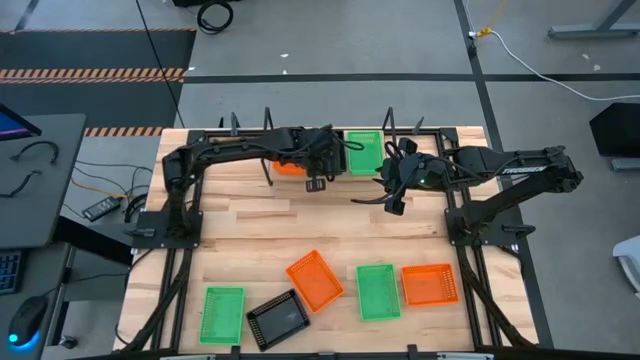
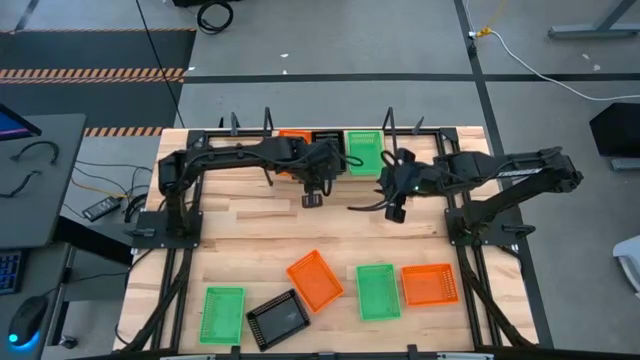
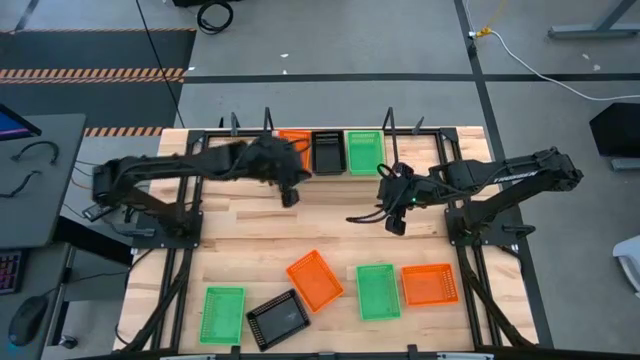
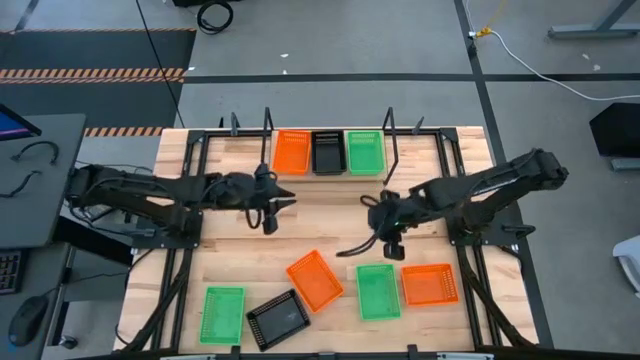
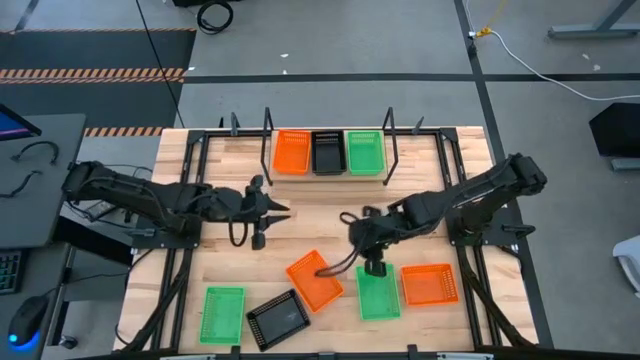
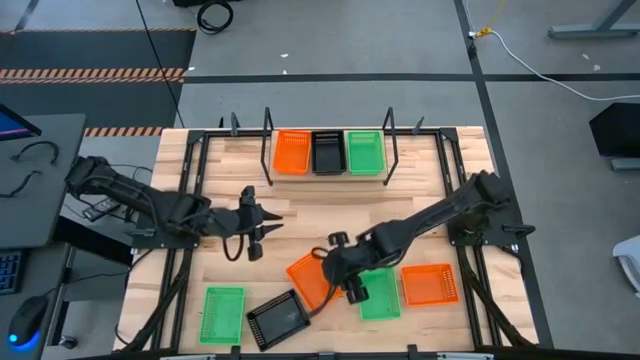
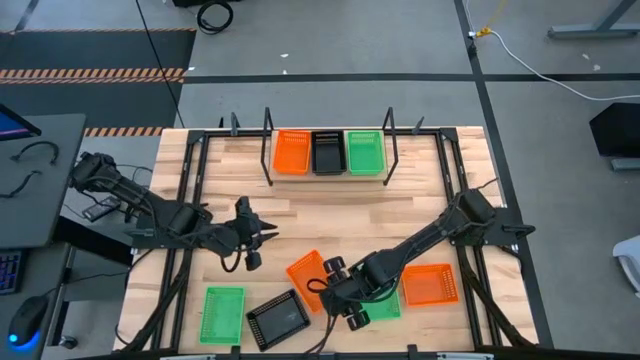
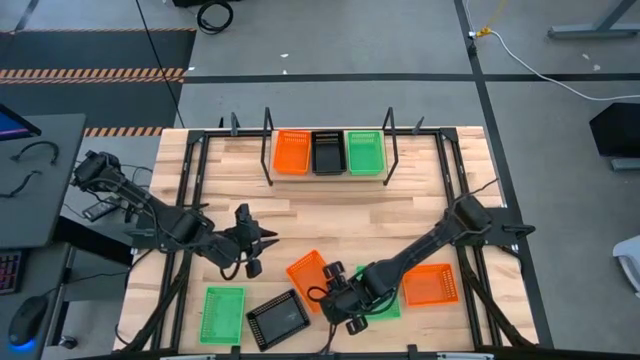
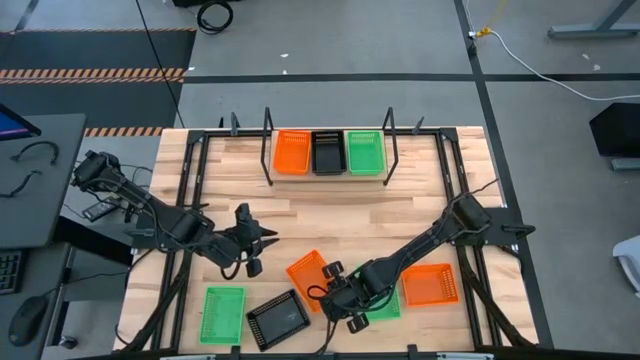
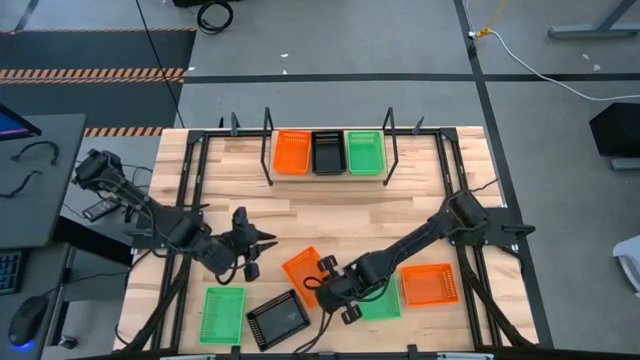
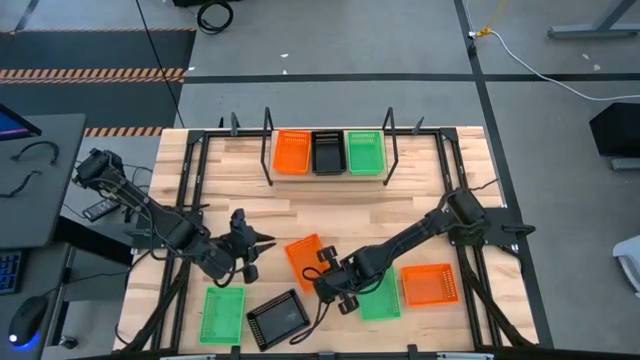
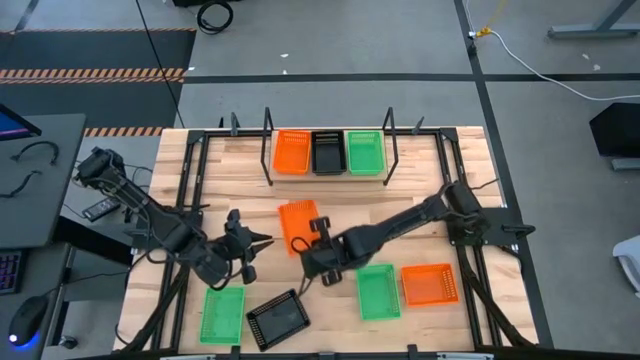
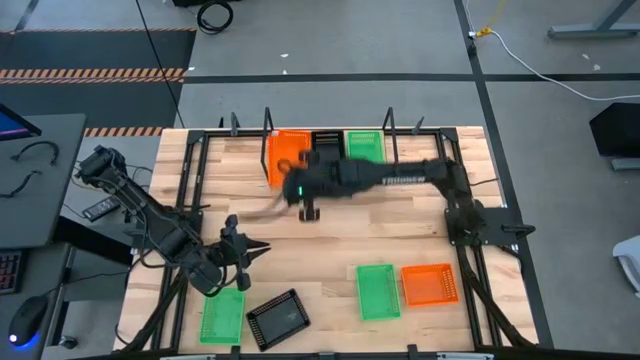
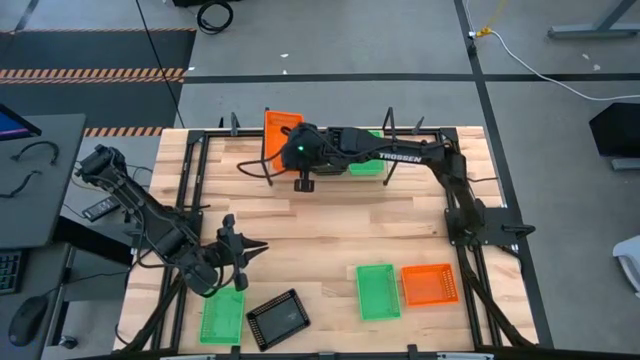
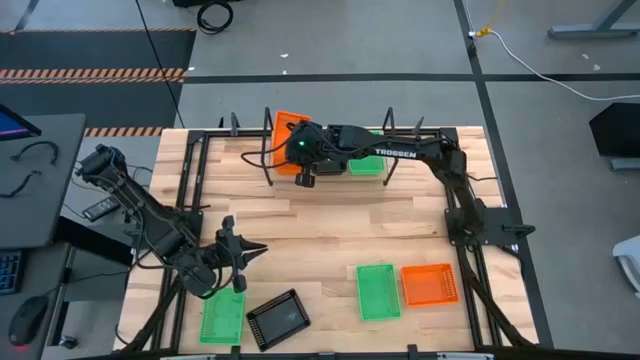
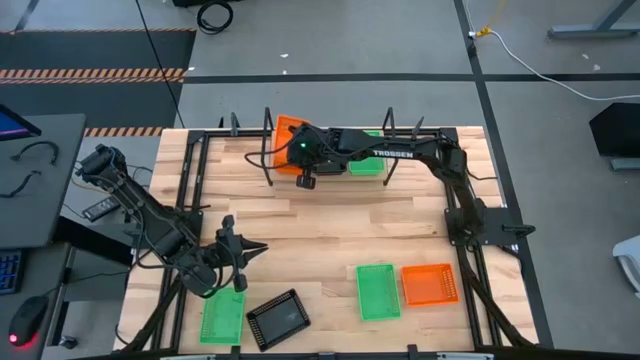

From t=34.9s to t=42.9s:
Task: Stack baskets on shelf by color
Stack the left orange bin on top of the other orange bin on the shelf

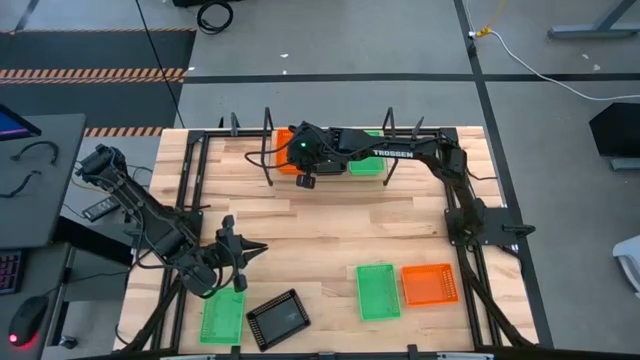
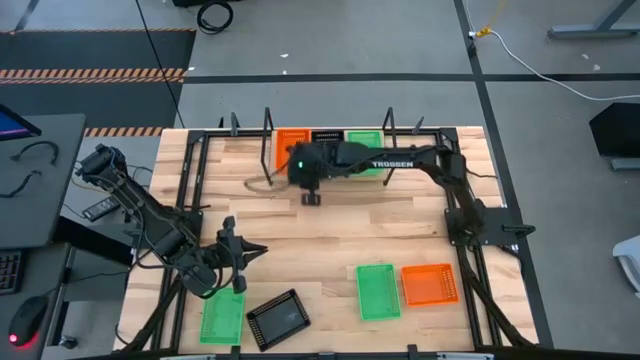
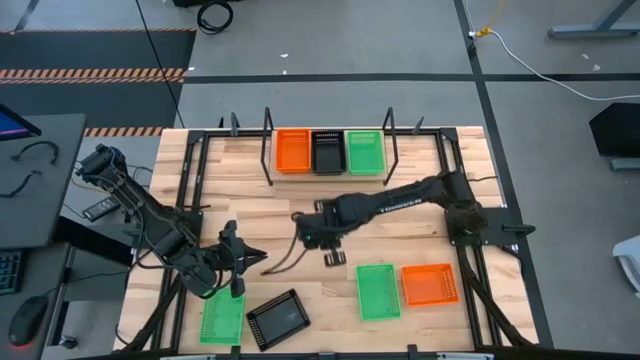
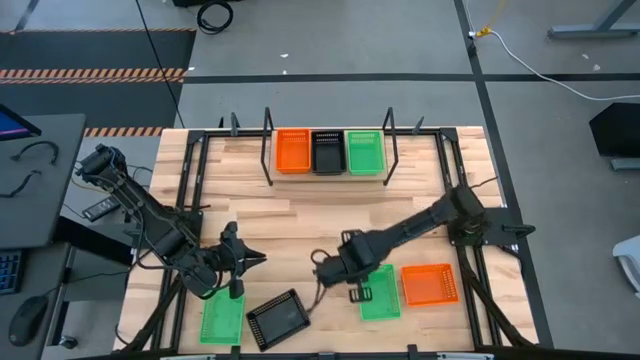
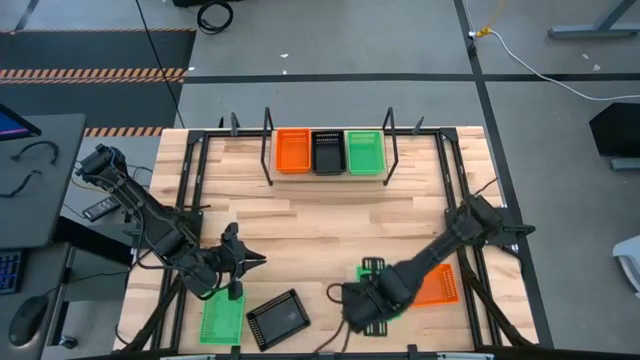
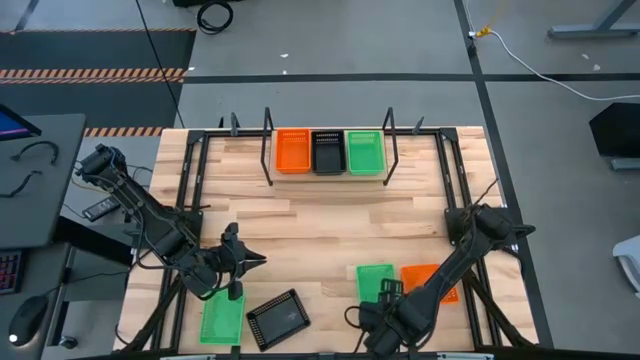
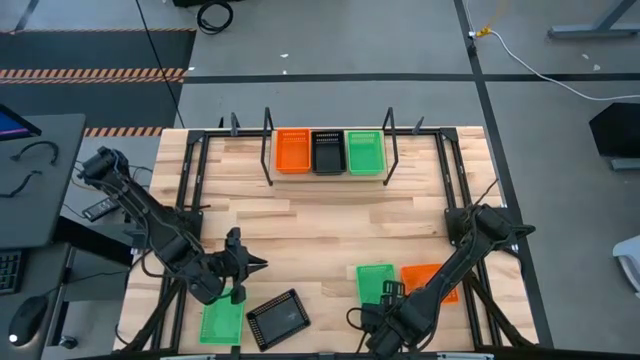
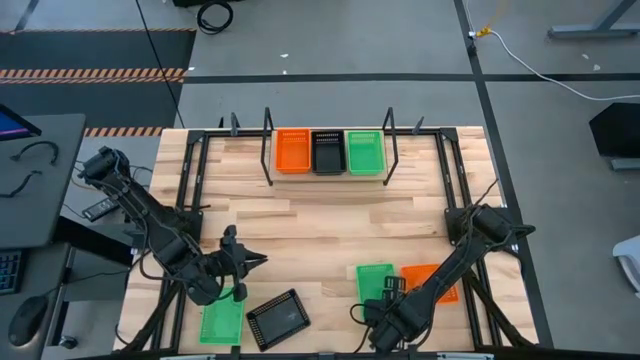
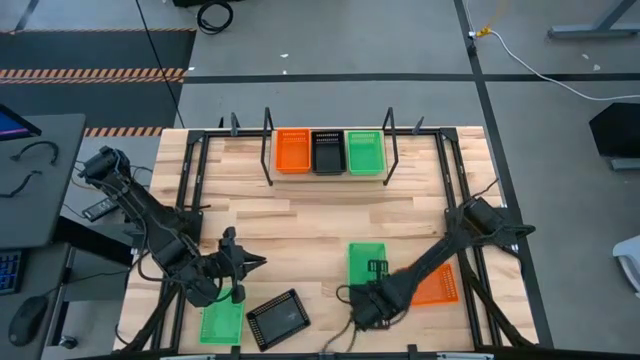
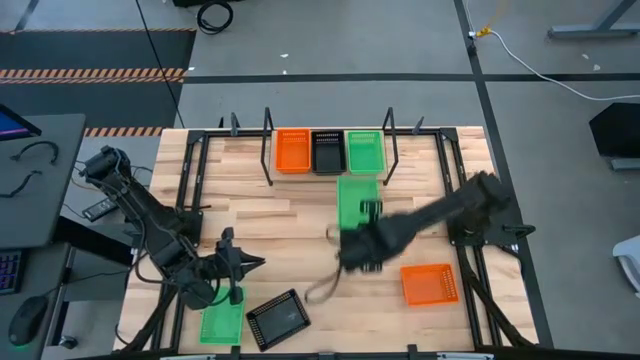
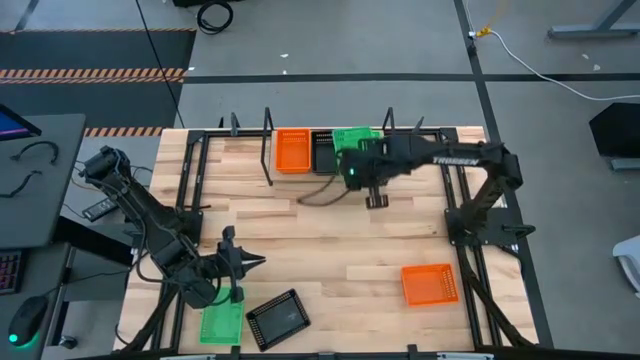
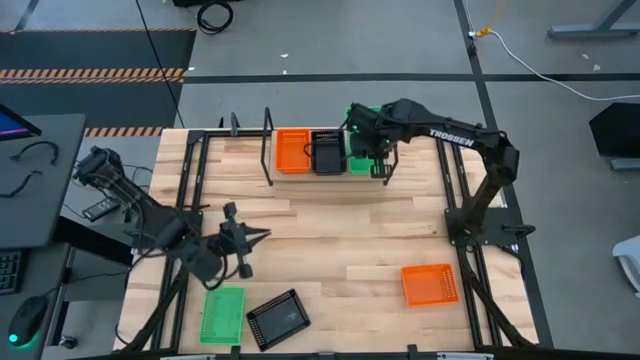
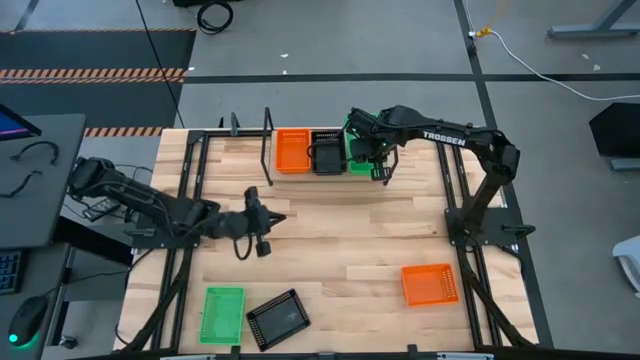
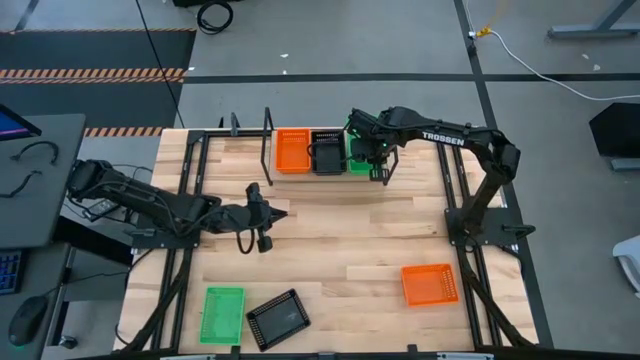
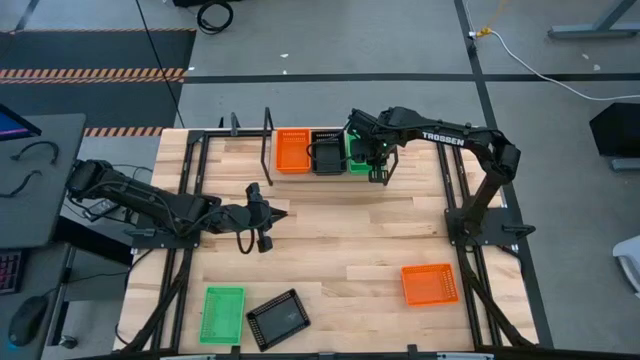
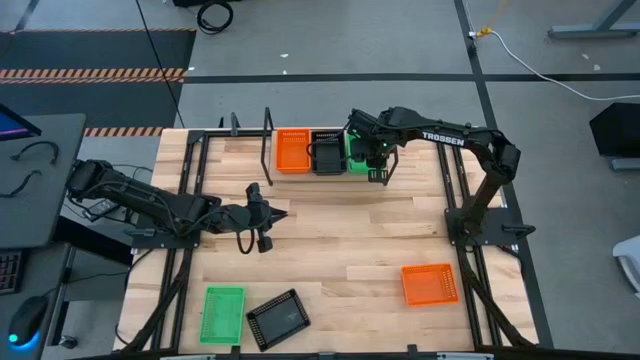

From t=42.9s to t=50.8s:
Stack the right green bin on top of the other green bin on the shelf

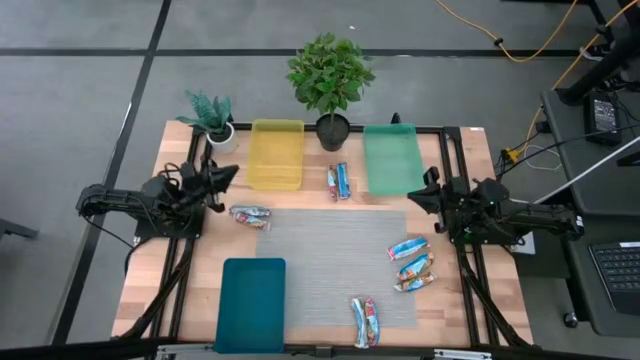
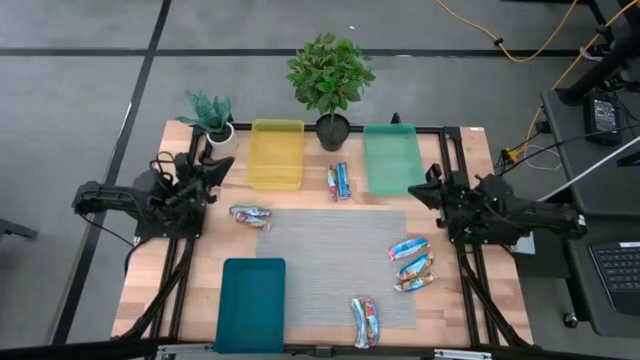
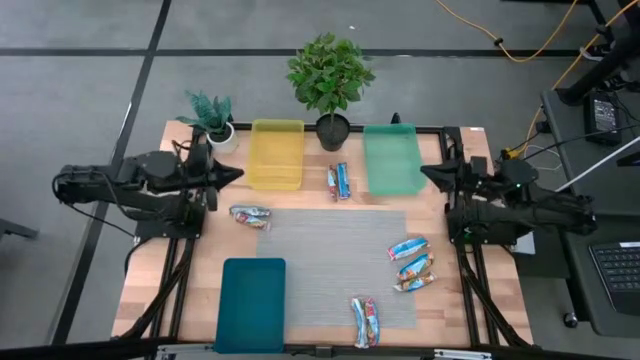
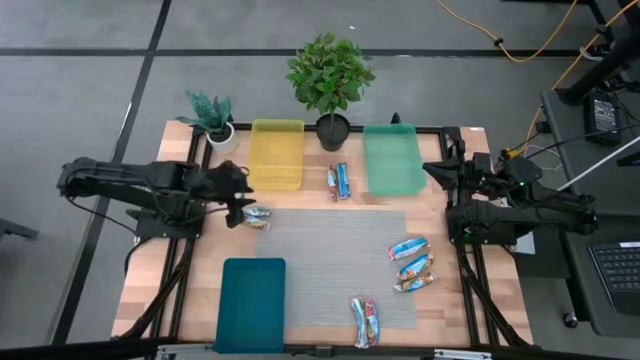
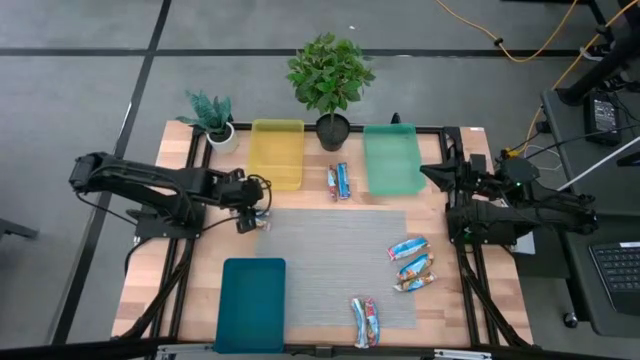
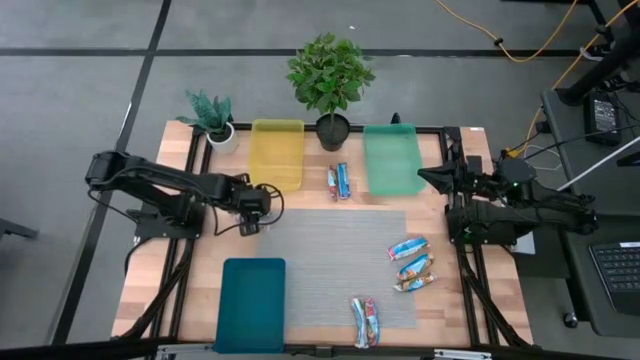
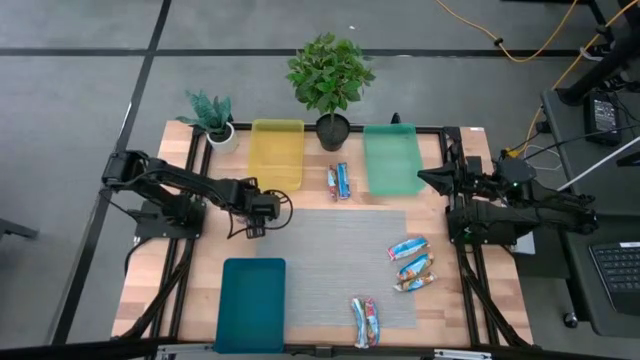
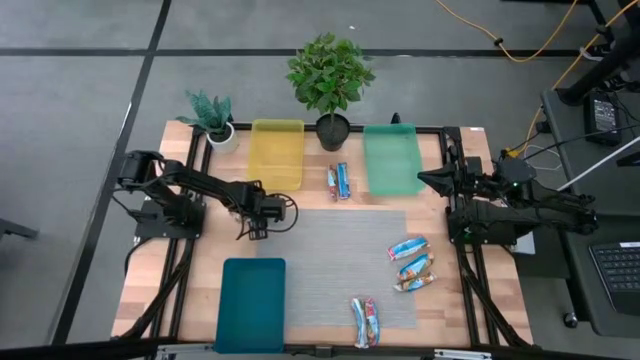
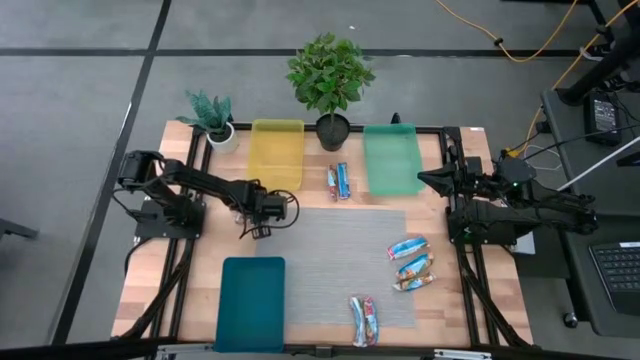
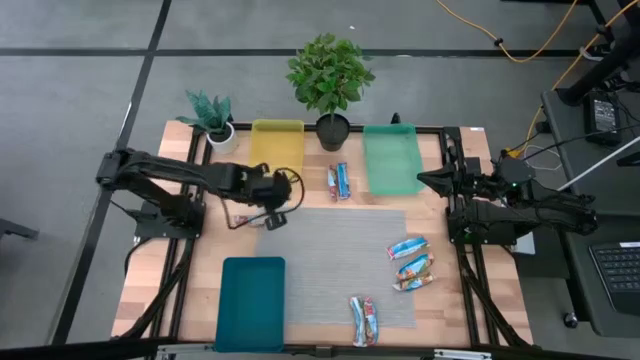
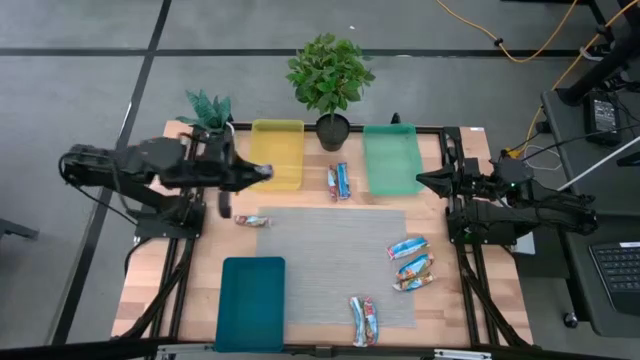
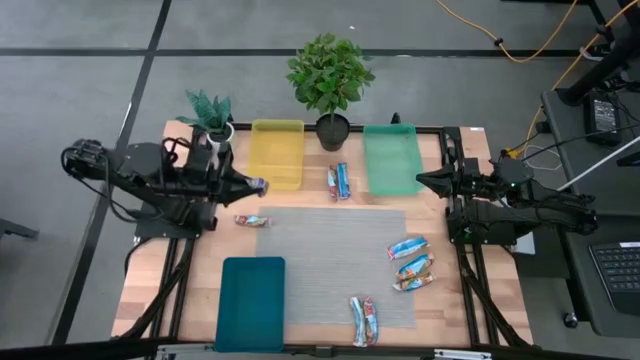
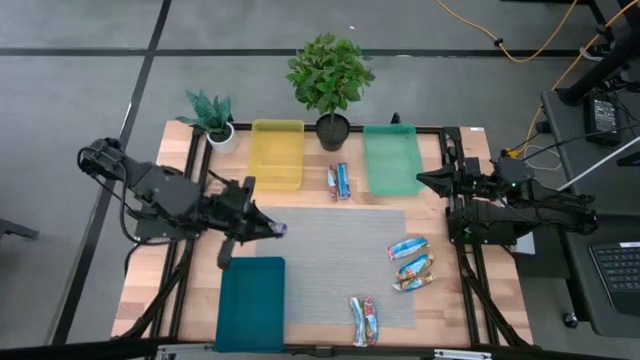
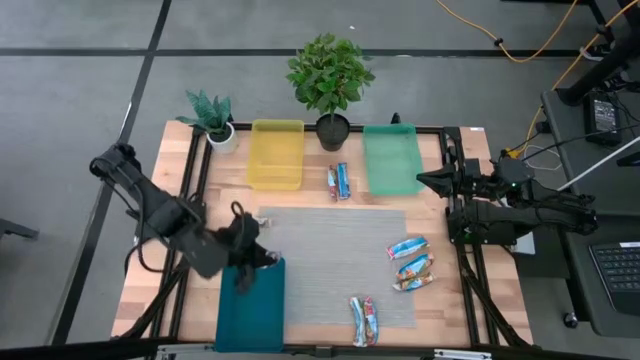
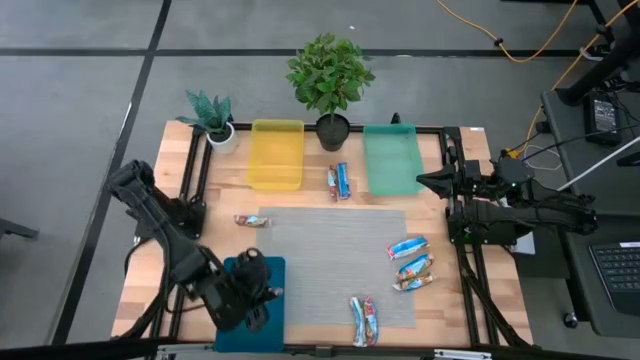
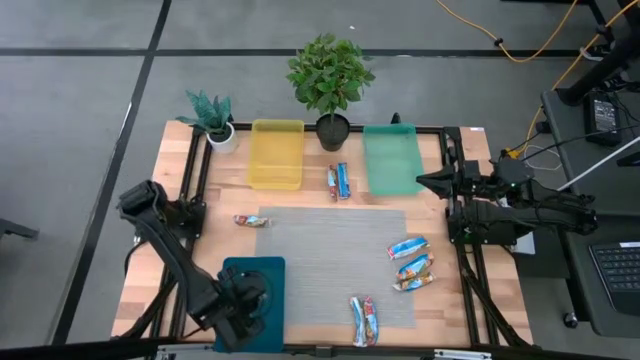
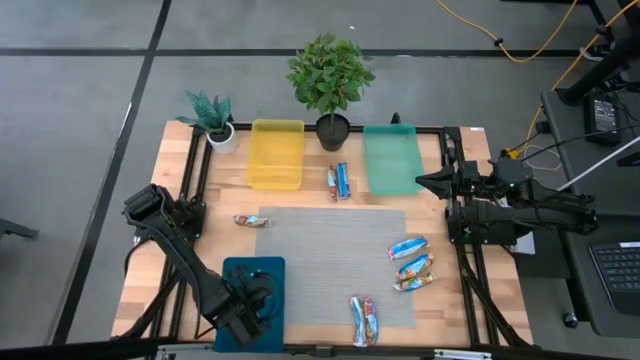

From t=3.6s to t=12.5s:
Task: Pick and place Granola Bars by type
Put the blue granola bar into the blue transparent bin
